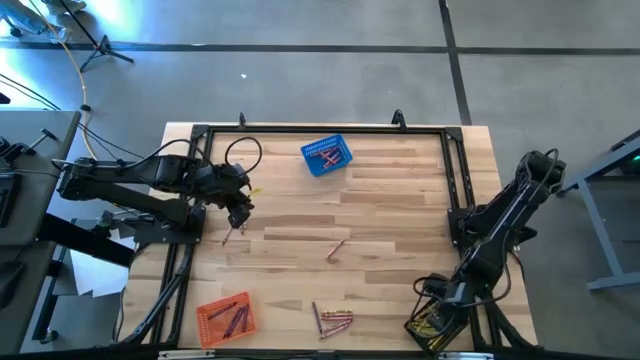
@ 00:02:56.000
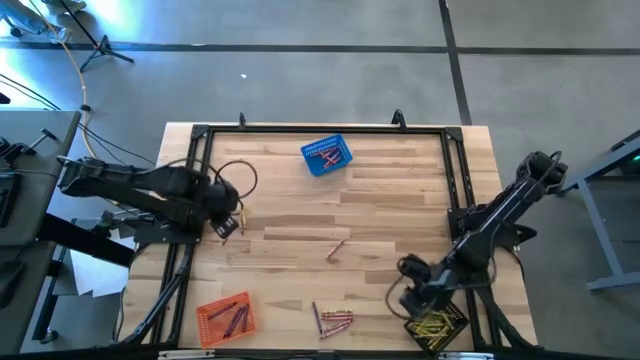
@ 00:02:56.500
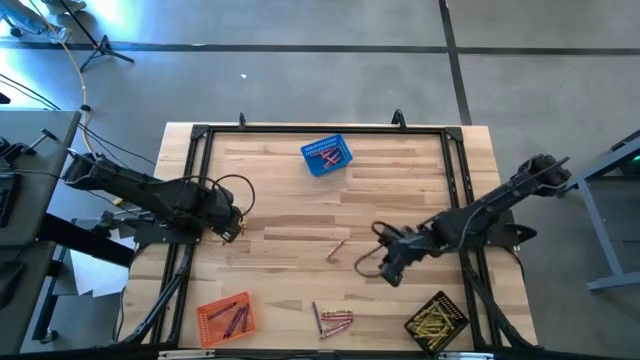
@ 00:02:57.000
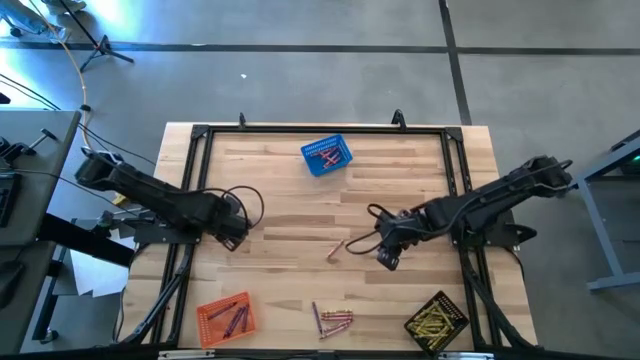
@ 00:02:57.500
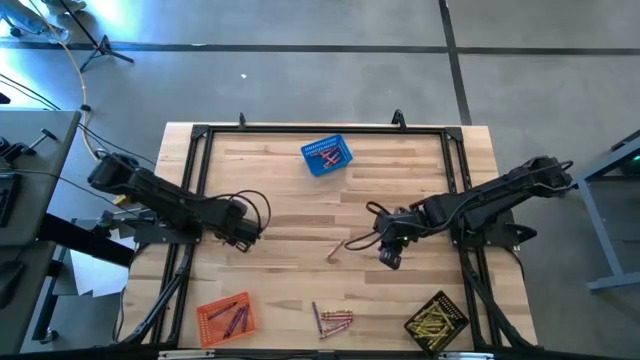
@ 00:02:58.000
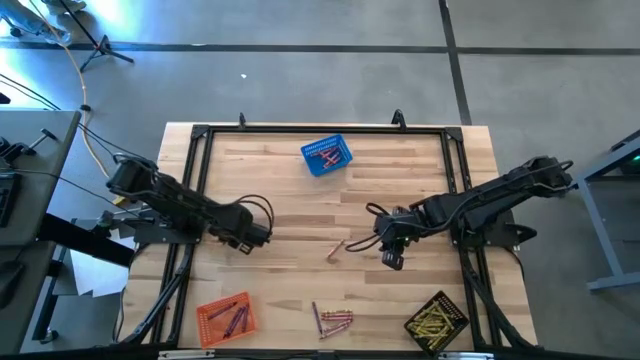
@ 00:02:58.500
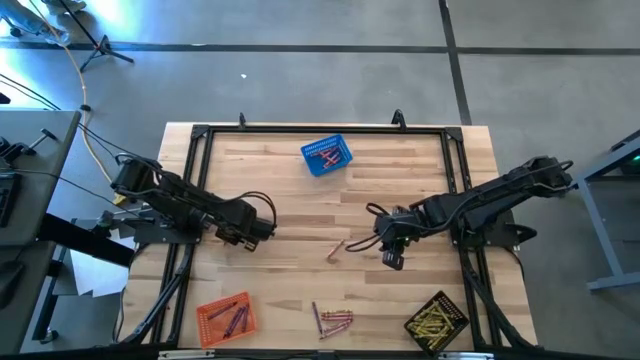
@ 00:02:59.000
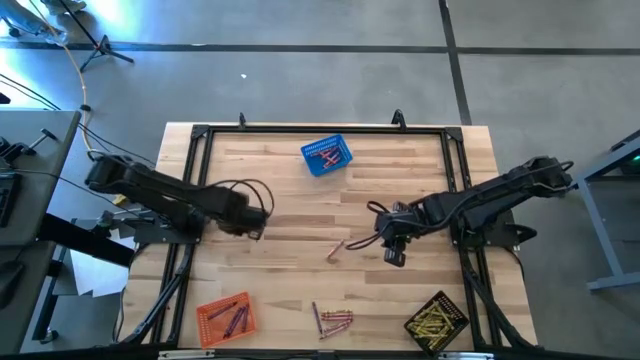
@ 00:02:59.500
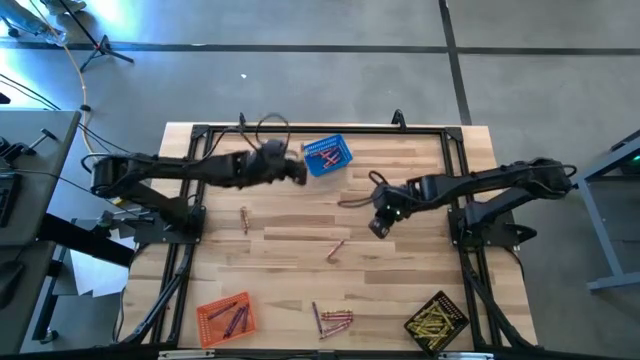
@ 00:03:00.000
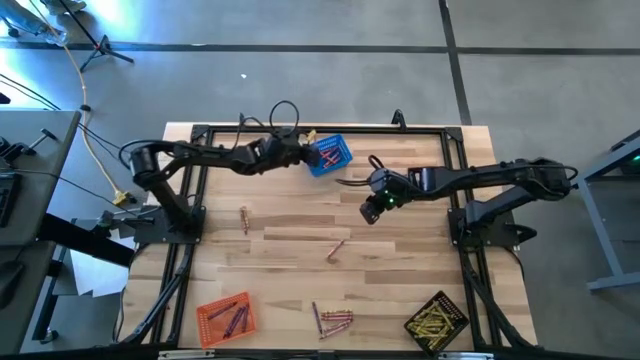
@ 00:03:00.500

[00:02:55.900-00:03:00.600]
Task: Sort crayons
Put the red crayon into the blue bin

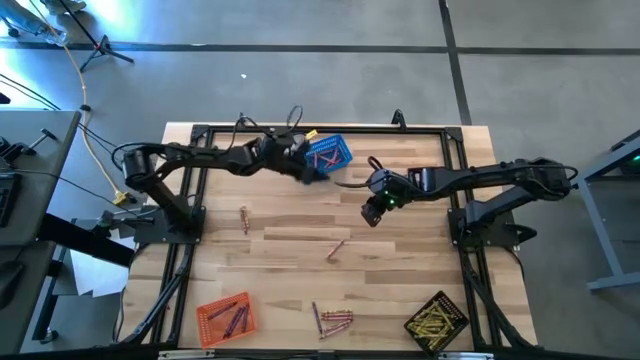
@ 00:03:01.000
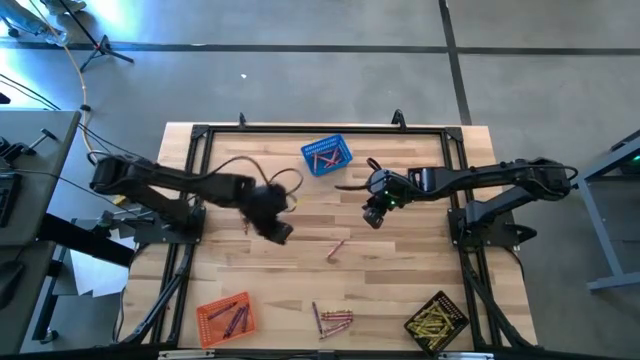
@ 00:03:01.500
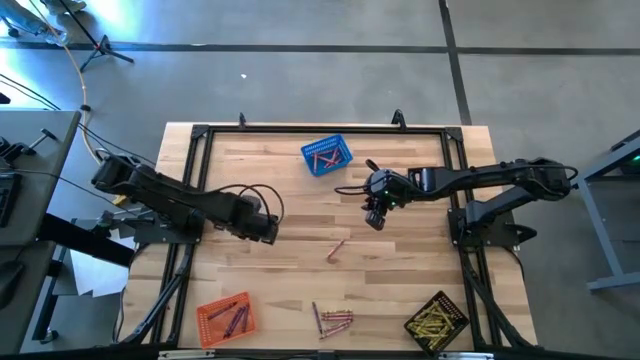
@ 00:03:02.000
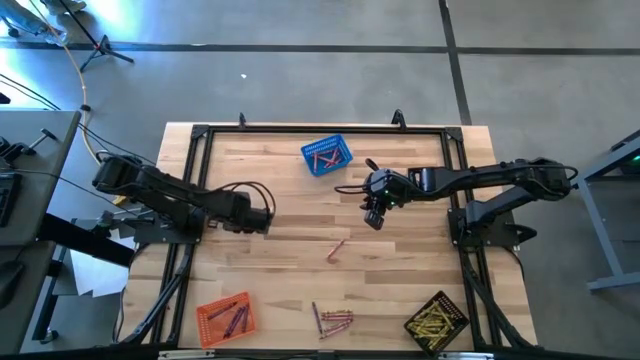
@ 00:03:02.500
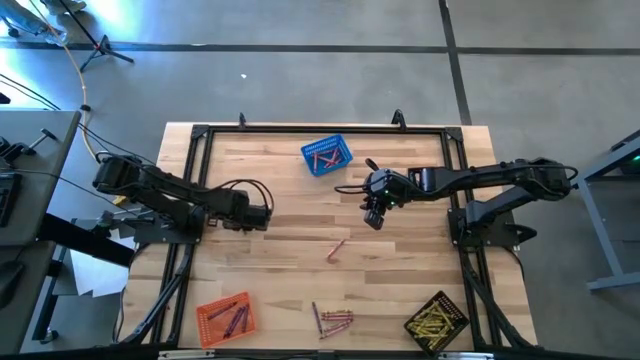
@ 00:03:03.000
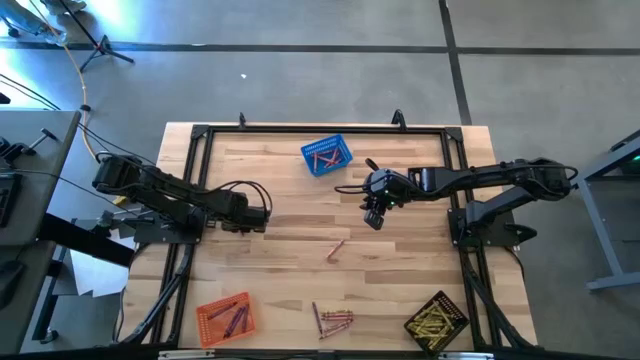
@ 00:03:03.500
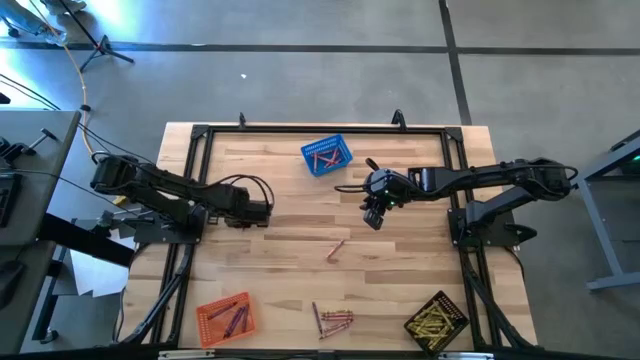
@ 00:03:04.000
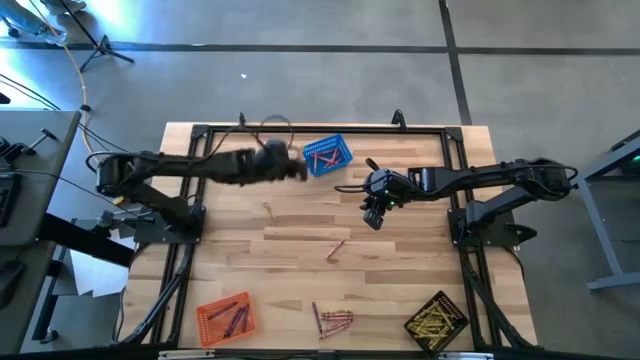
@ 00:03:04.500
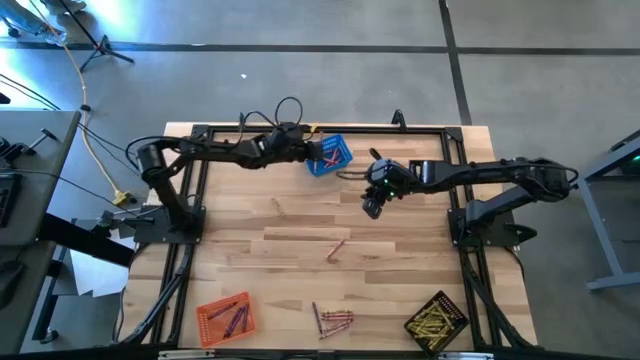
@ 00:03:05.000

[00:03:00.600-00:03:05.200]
Put the red crayon into the blue bin

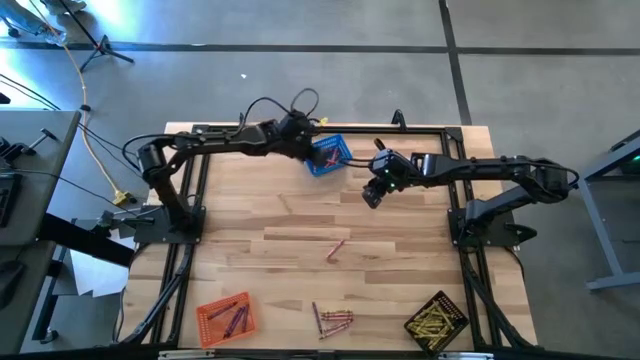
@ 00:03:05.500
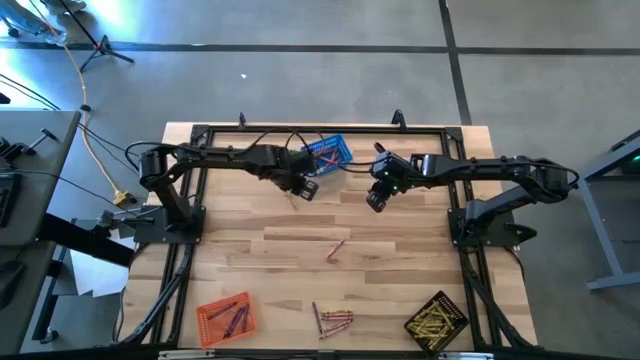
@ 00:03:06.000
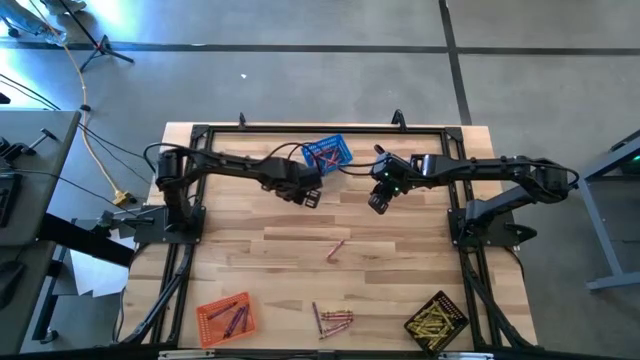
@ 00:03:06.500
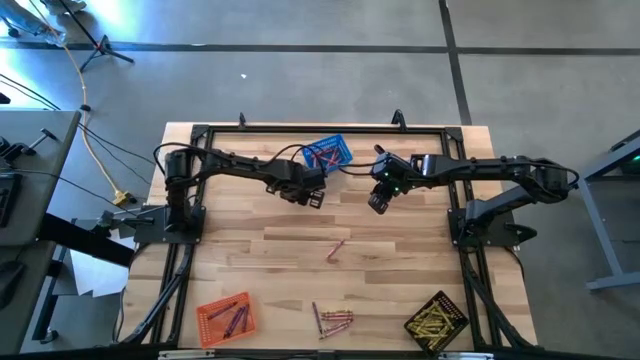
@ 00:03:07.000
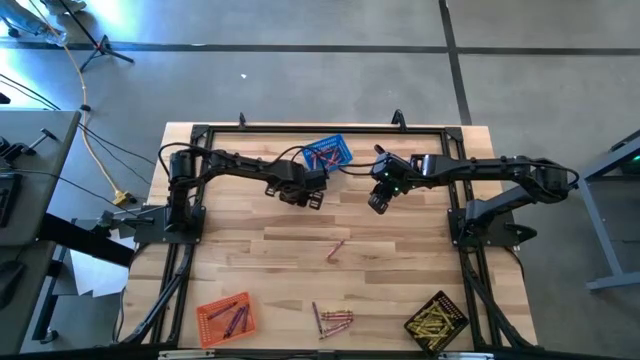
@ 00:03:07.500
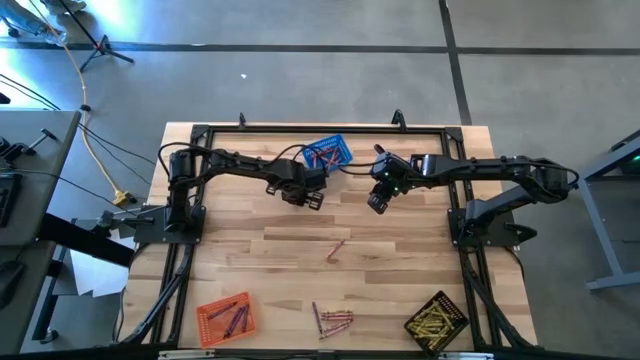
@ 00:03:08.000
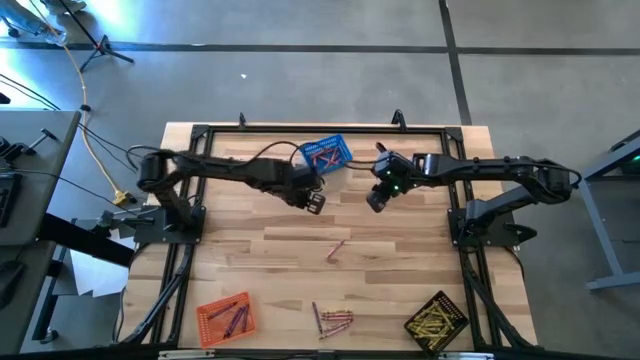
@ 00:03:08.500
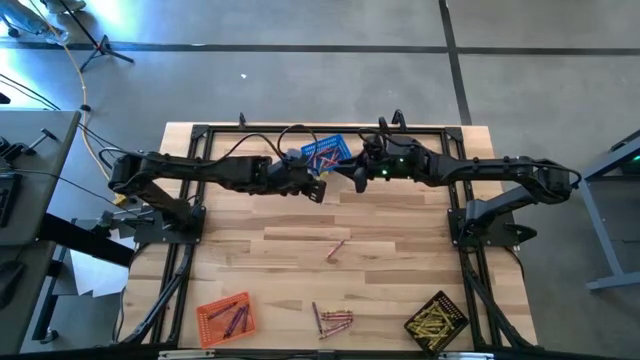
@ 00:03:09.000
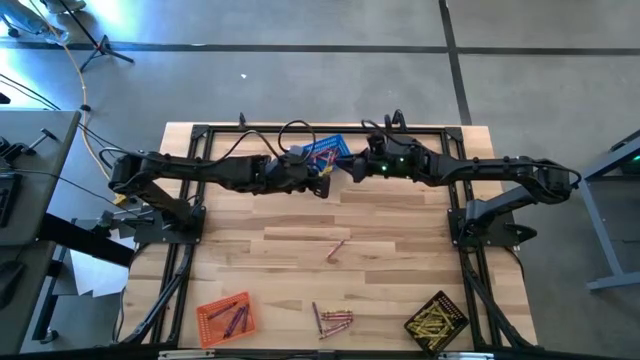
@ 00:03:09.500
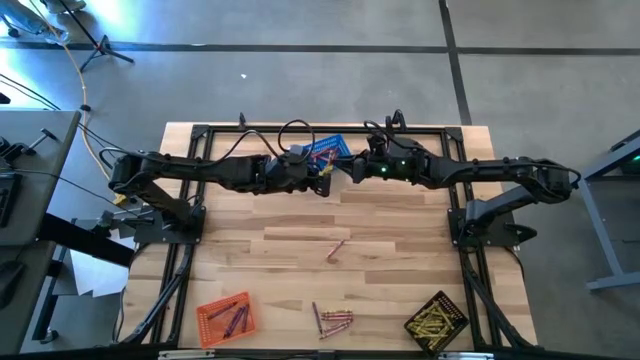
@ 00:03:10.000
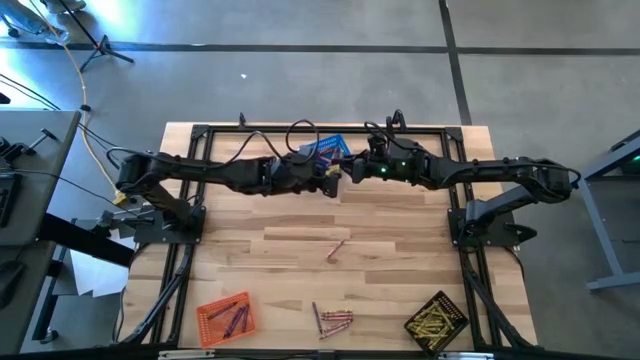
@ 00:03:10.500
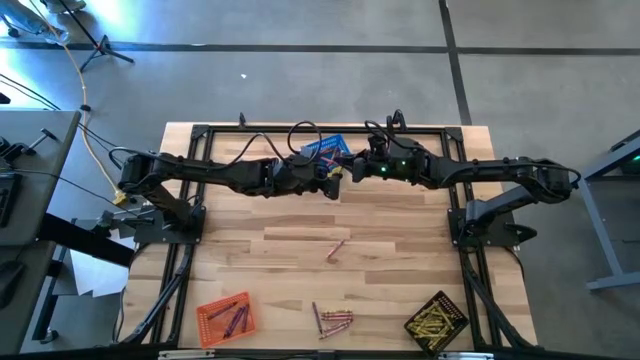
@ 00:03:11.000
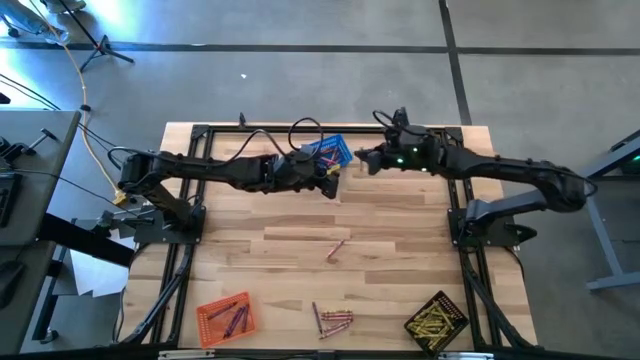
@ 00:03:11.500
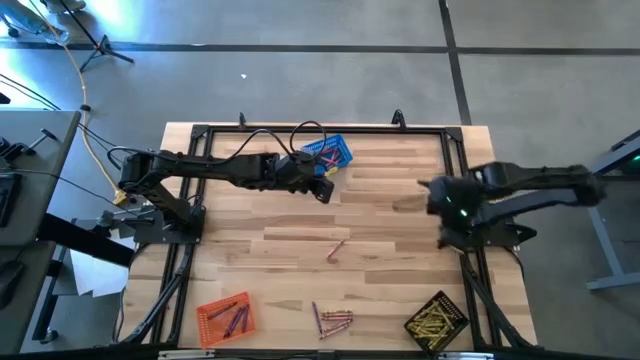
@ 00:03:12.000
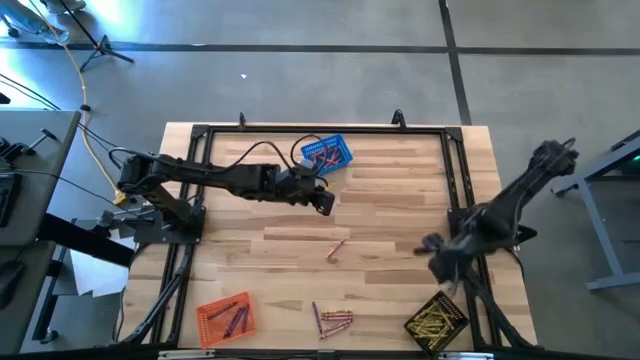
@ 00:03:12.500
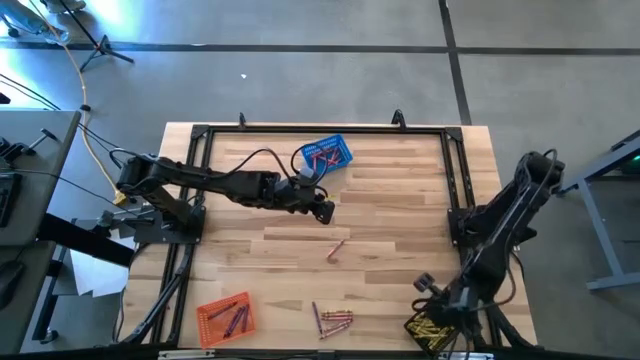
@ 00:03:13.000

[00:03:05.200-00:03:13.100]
Put the yellow crayon into the black bin

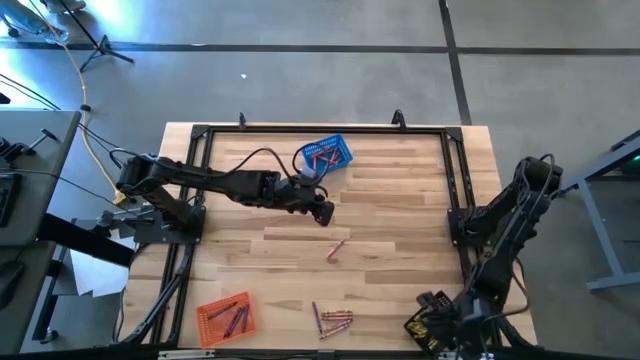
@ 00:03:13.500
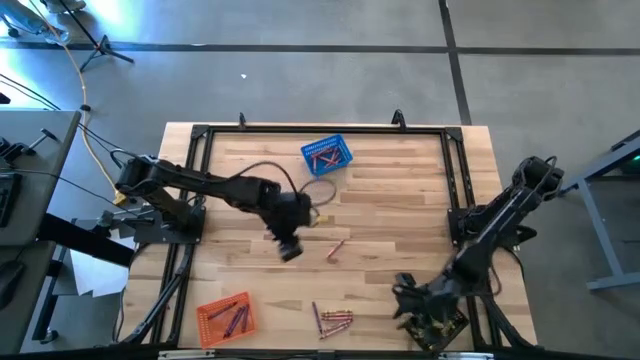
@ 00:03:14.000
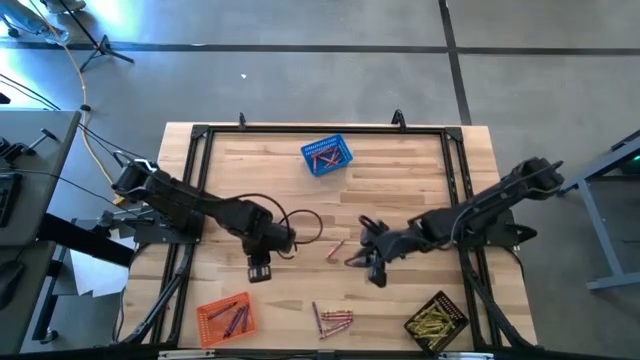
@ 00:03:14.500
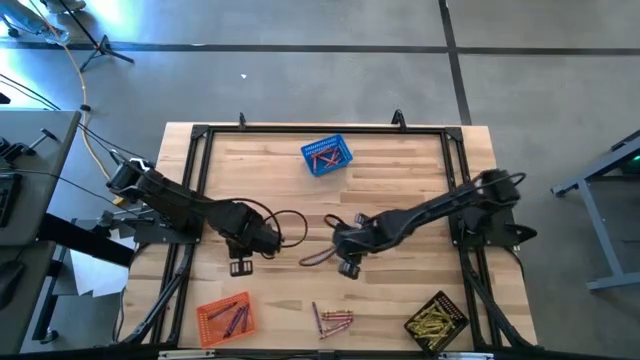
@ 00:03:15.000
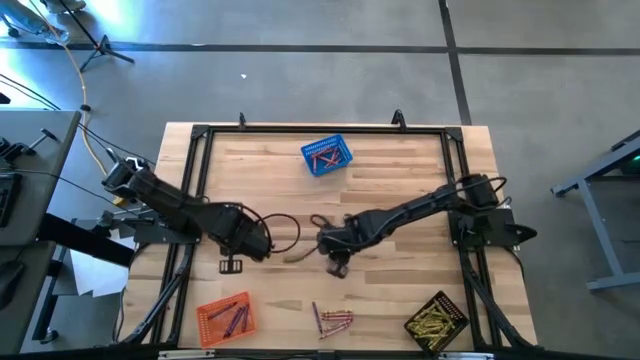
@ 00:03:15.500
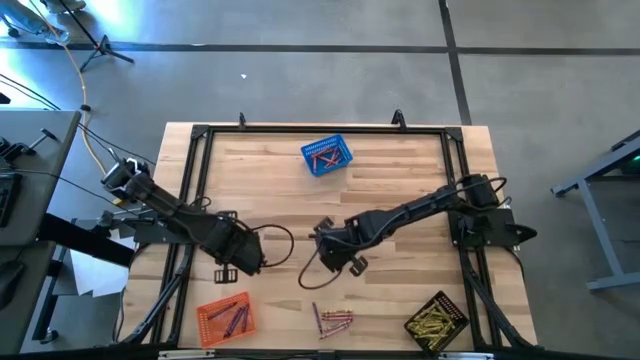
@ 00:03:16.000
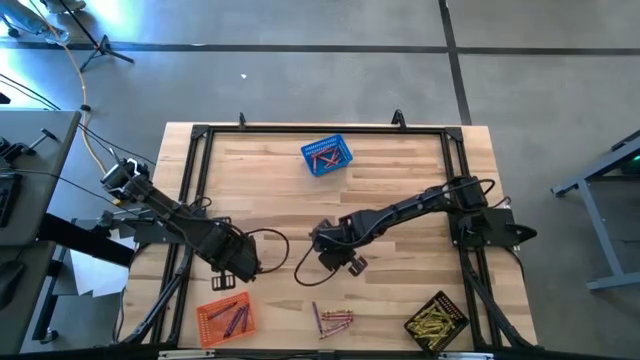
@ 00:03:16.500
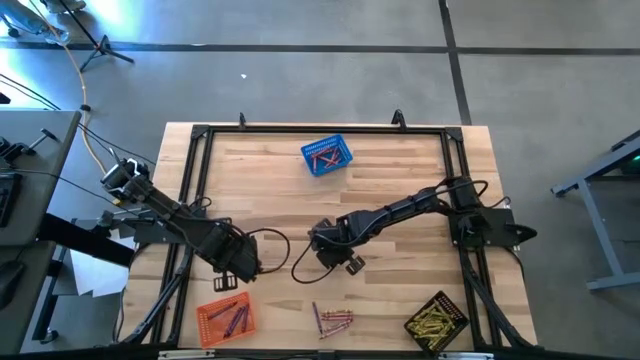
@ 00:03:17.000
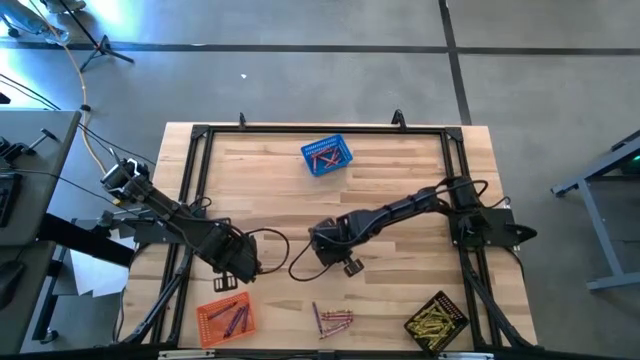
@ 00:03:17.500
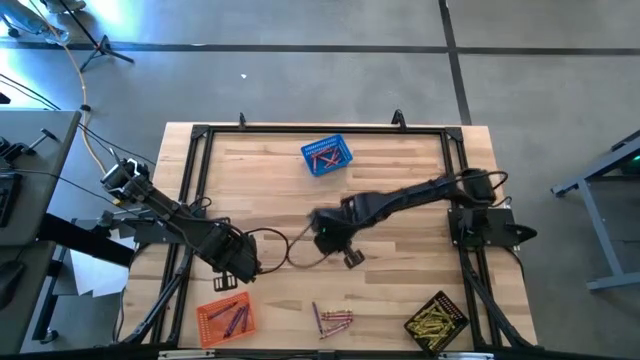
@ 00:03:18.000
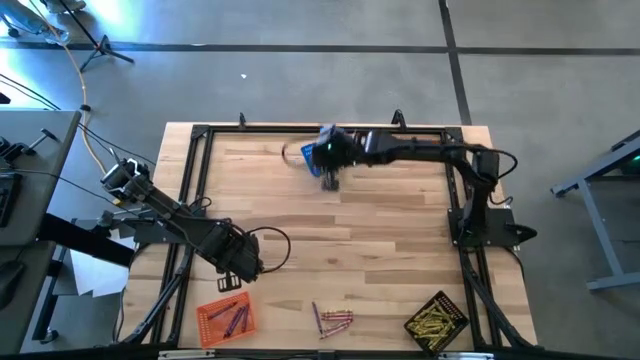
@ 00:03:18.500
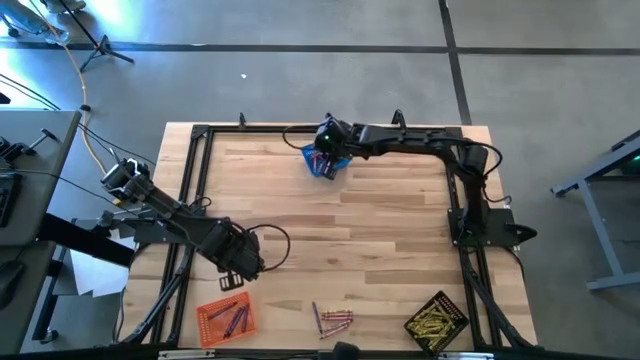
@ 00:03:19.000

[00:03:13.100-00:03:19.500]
Put the red crayon into the blue bin
